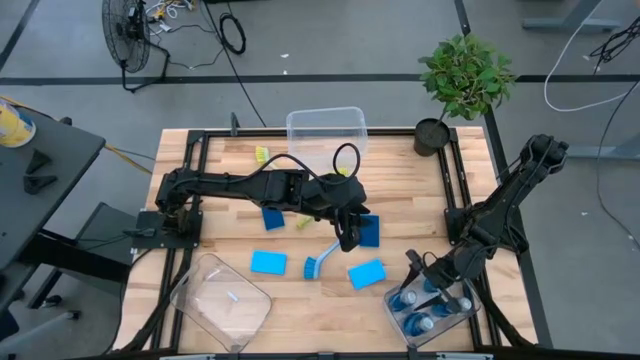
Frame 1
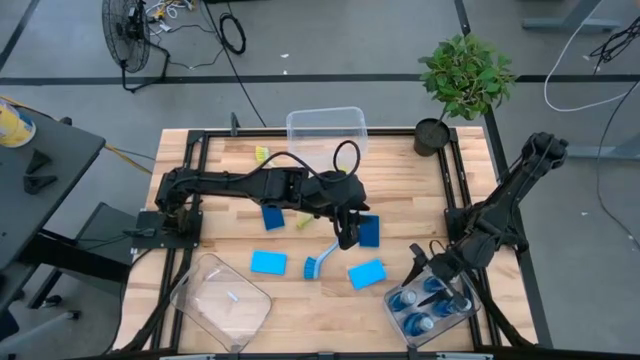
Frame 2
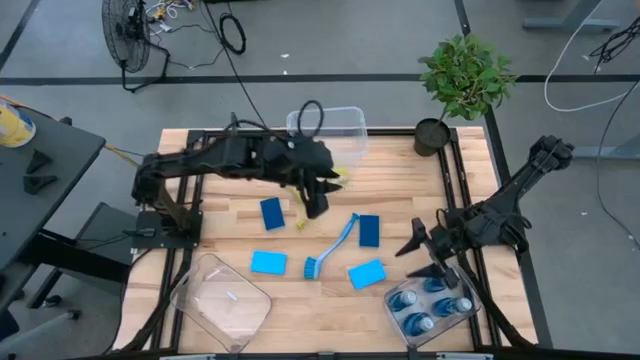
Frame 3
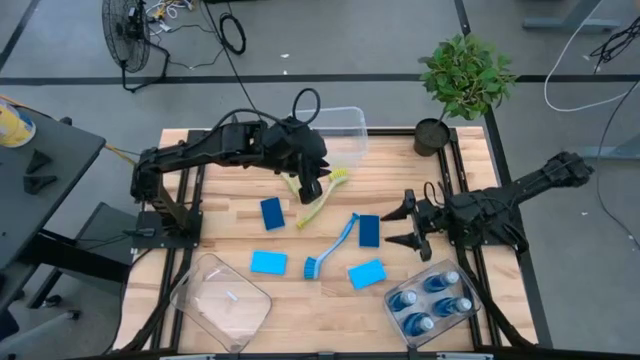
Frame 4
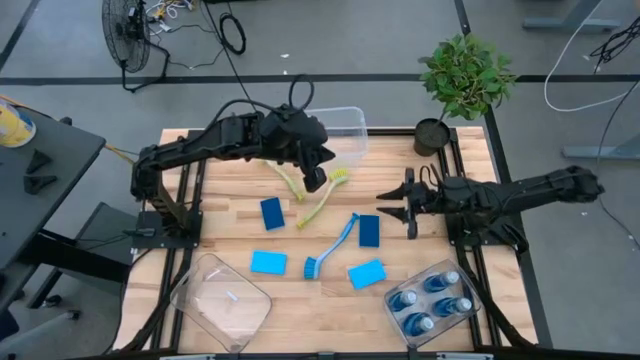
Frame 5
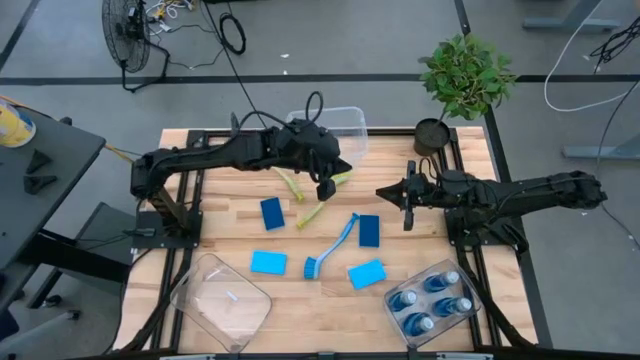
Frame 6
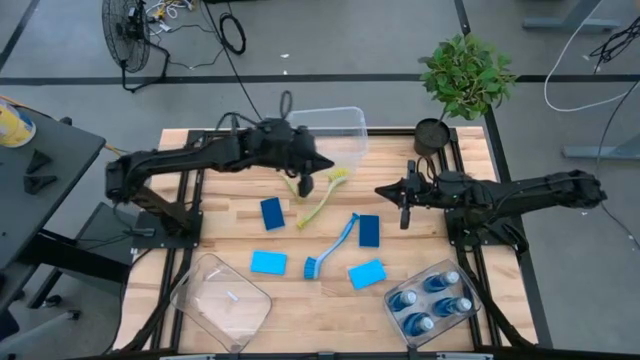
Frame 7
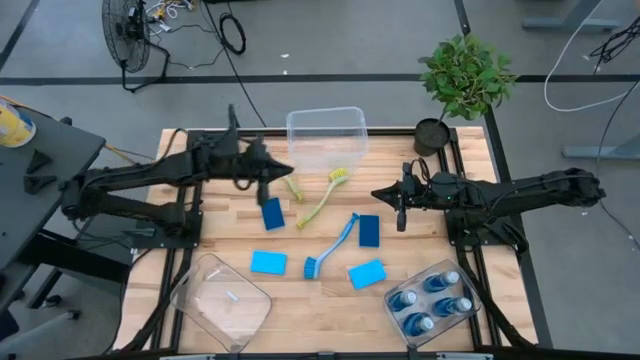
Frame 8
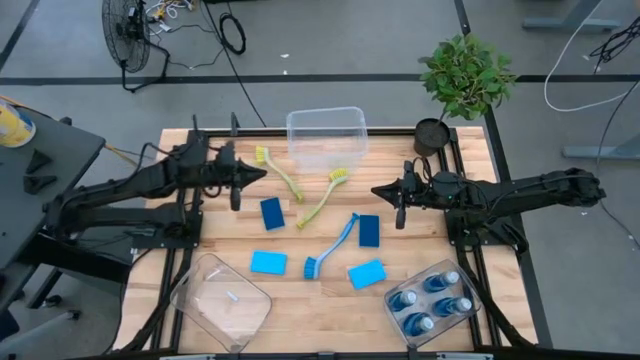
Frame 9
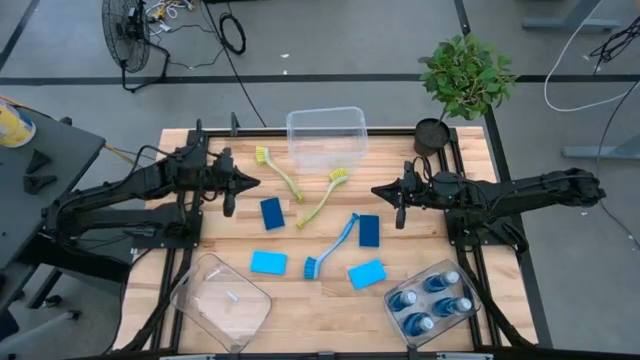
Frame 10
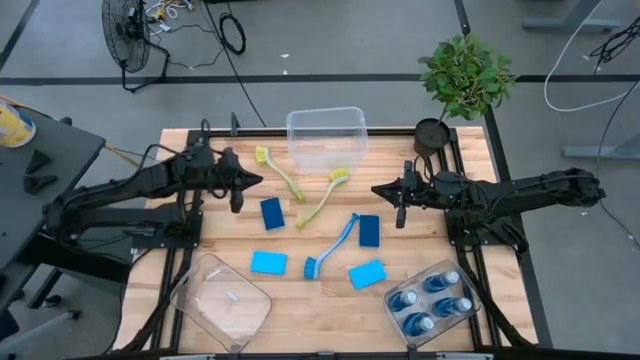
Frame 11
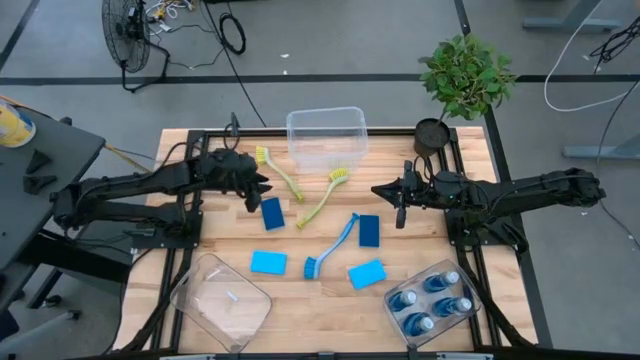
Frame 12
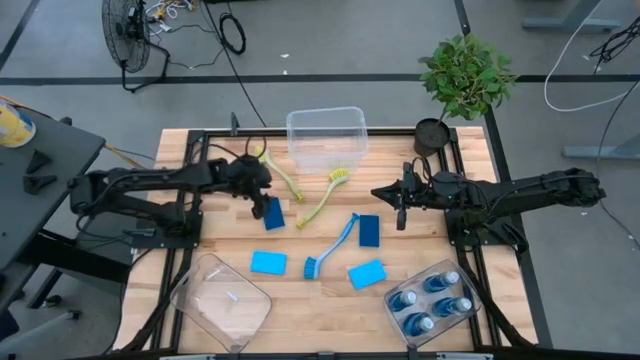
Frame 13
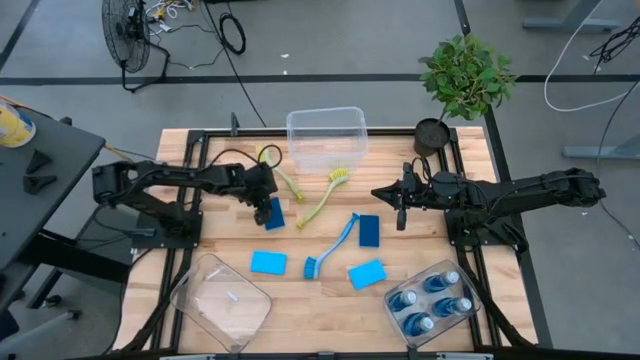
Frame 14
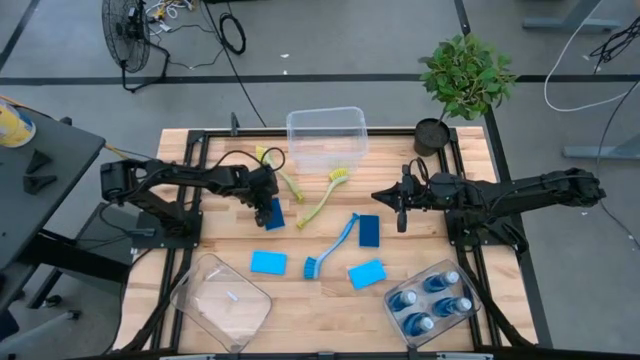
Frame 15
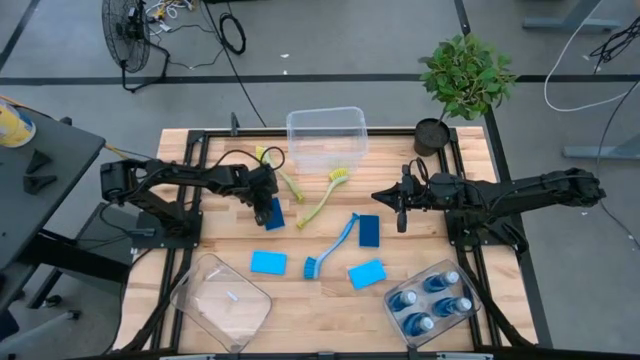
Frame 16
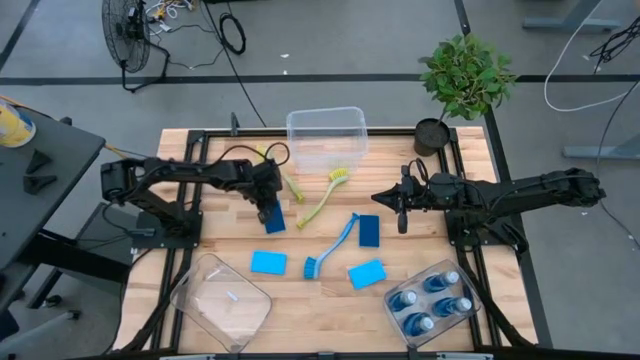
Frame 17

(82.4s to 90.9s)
Task: Pick & Place Kitchen Sink Supplies
Put the blue sponge into the bottom left transparent bin

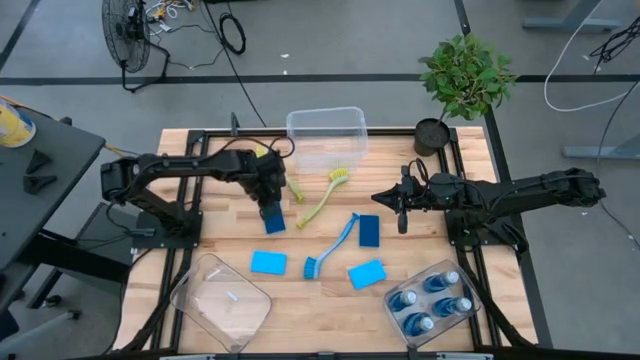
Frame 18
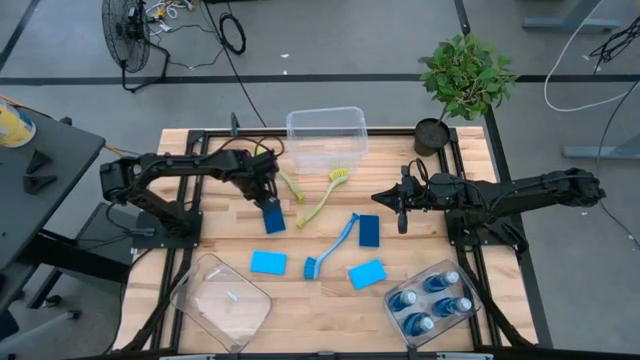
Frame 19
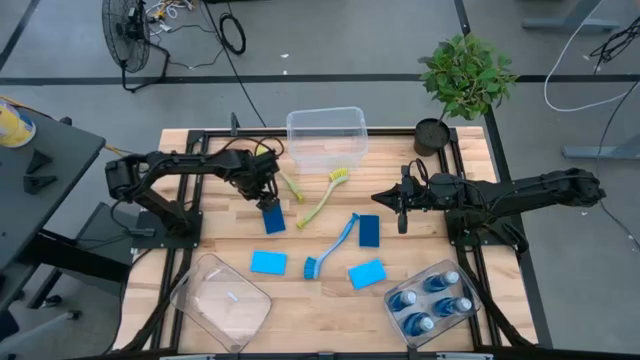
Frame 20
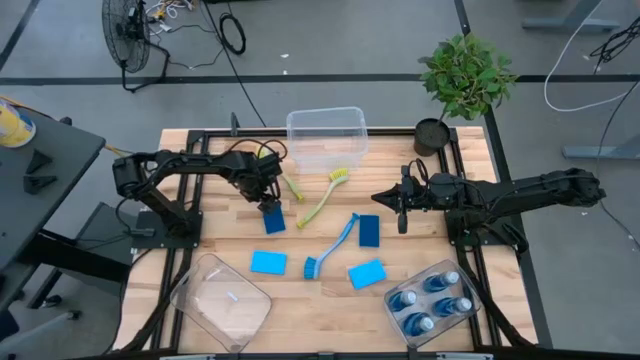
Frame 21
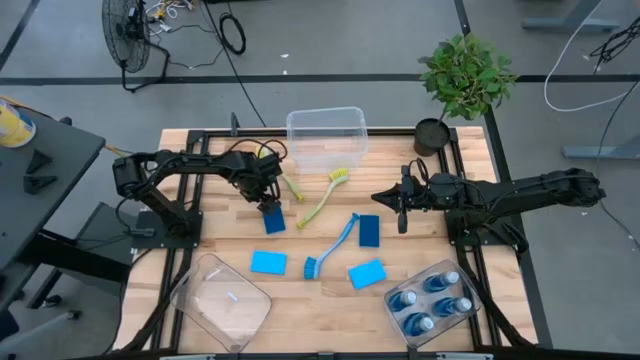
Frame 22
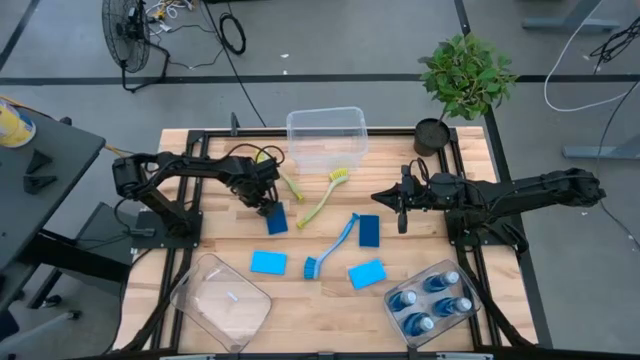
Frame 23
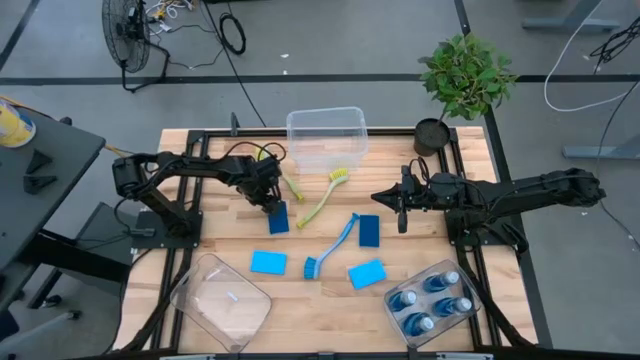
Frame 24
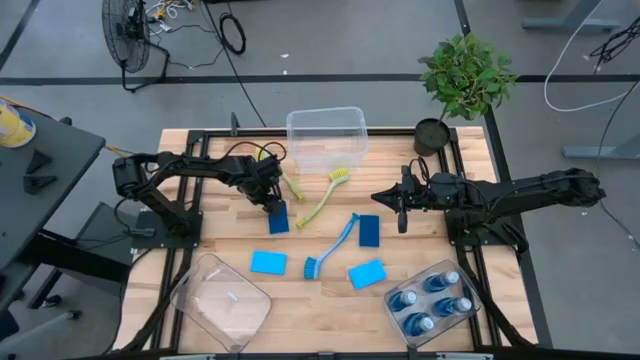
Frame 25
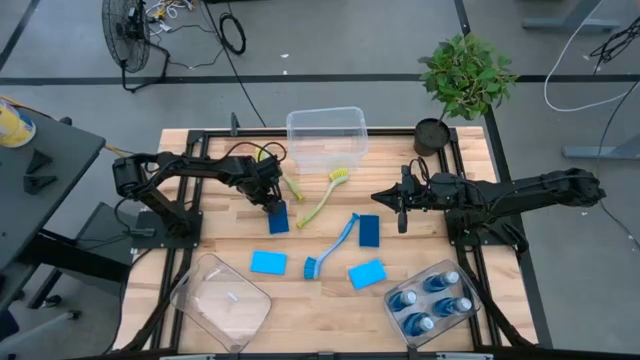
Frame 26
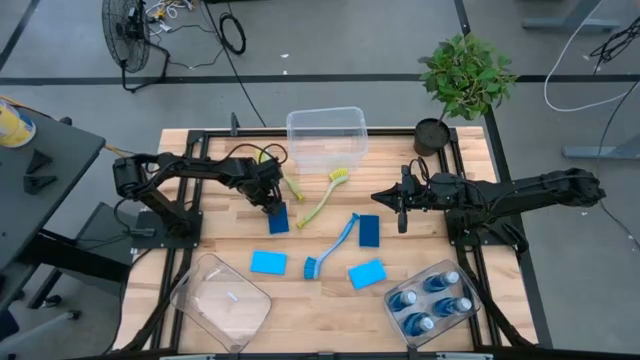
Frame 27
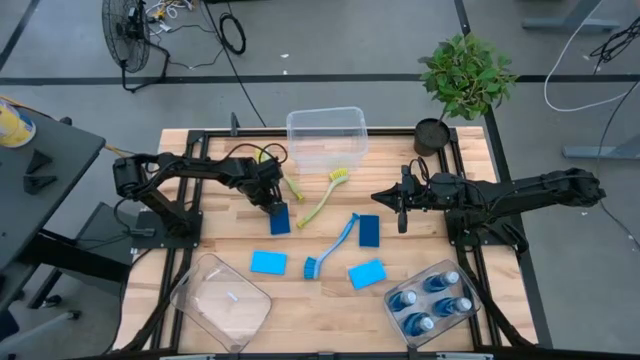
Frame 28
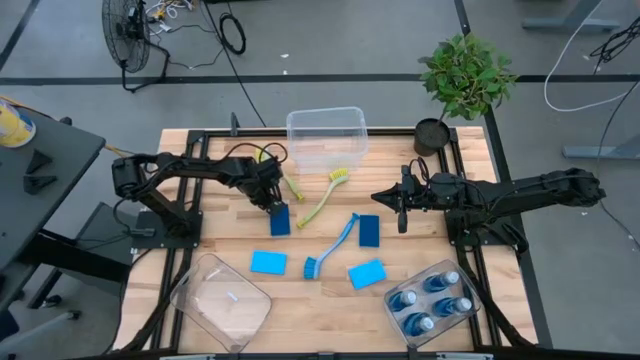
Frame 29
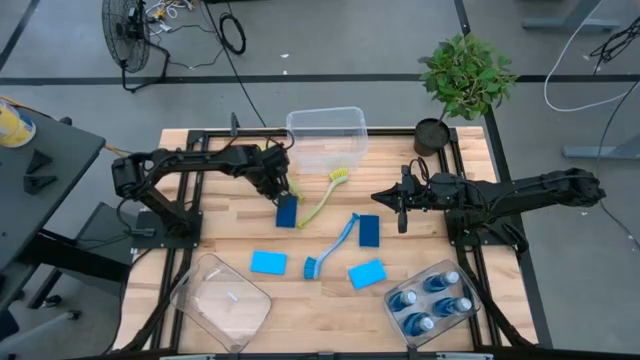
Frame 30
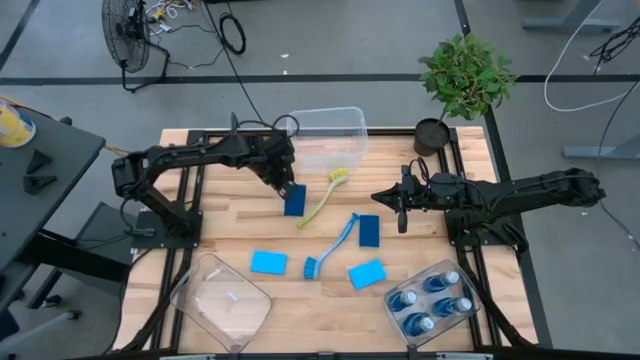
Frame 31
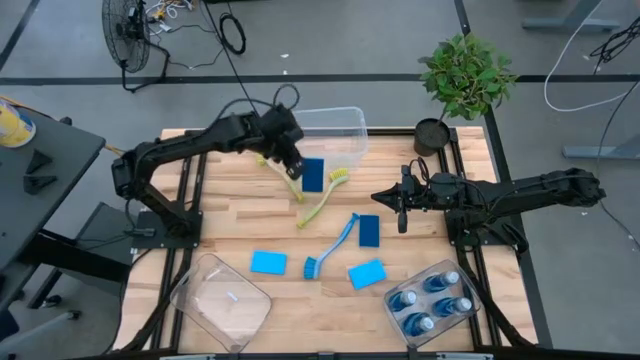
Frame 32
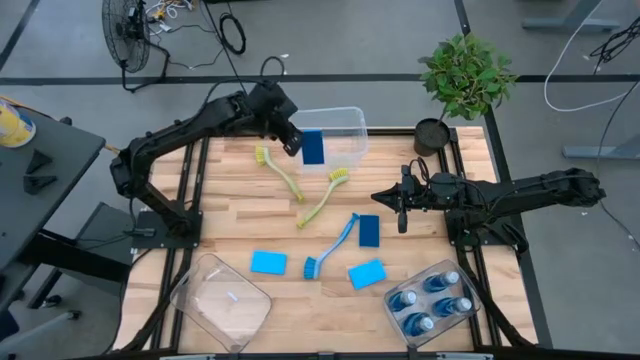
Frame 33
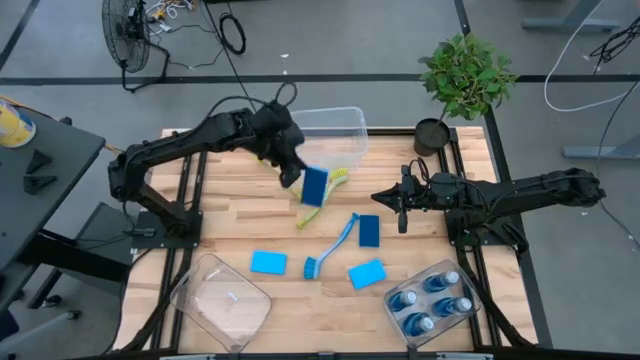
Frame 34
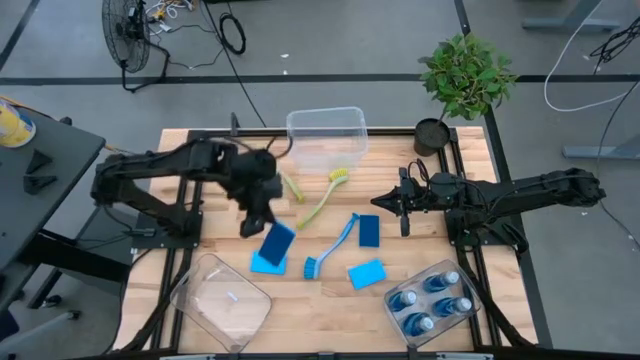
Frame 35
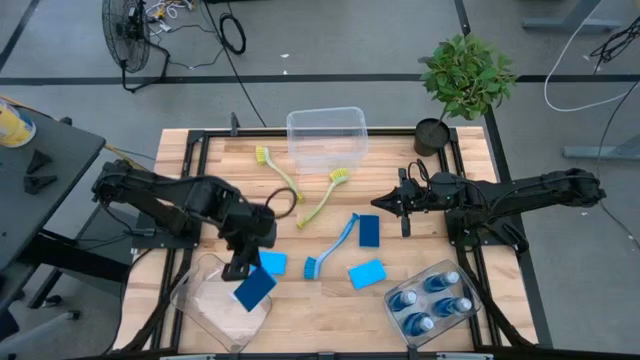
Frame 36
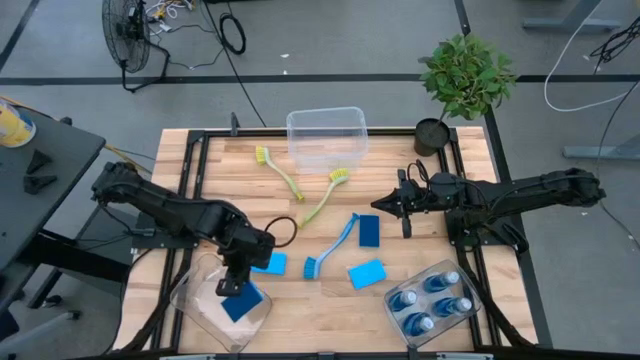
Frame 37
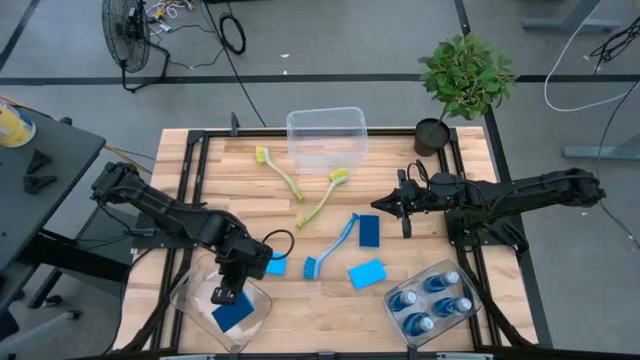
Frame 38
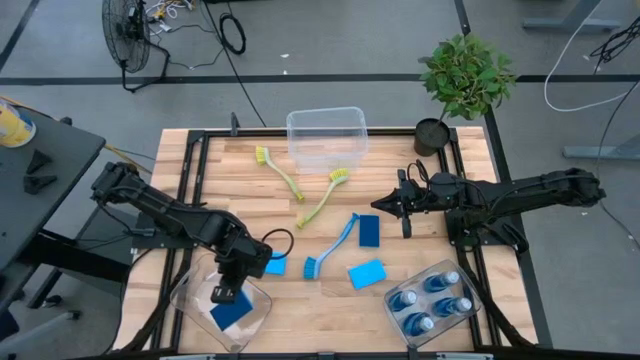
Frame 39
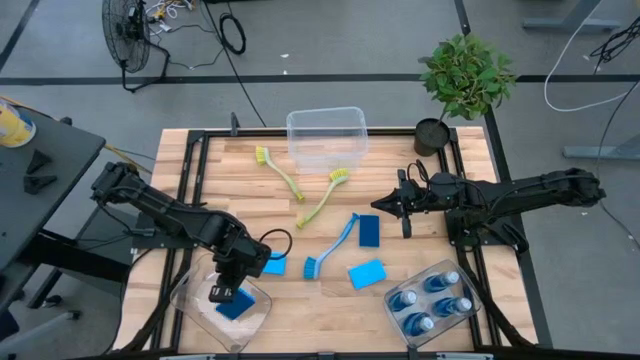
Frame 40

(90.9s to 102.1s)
Put the blue sponge into the bottom left transparent bin

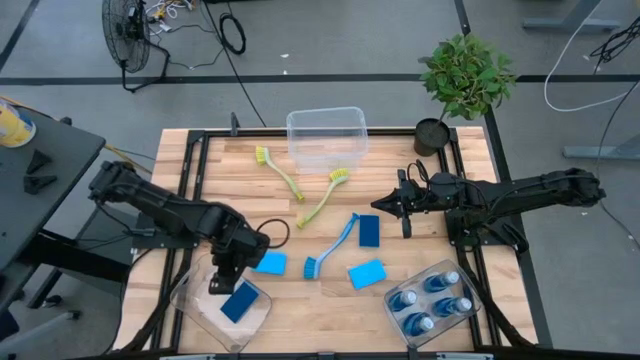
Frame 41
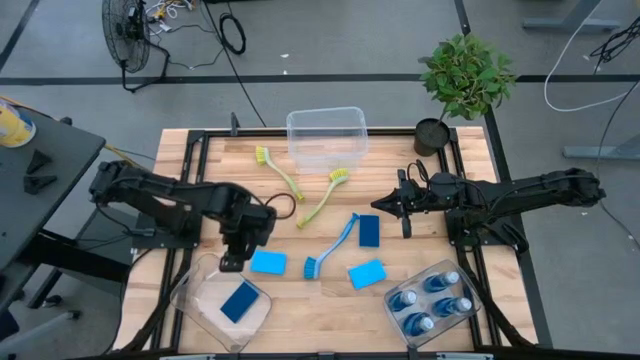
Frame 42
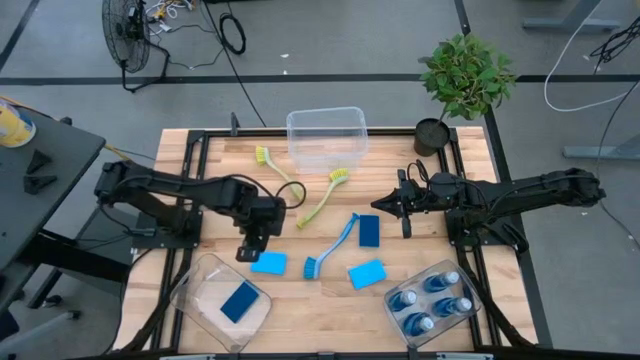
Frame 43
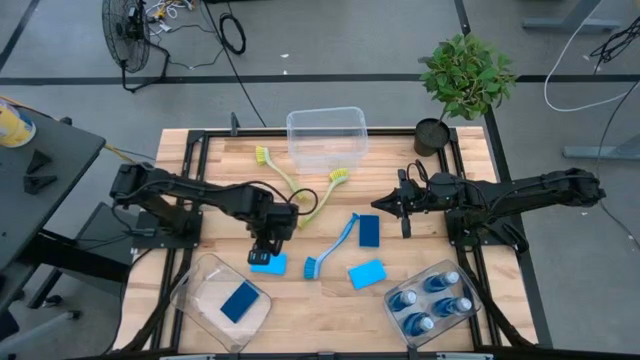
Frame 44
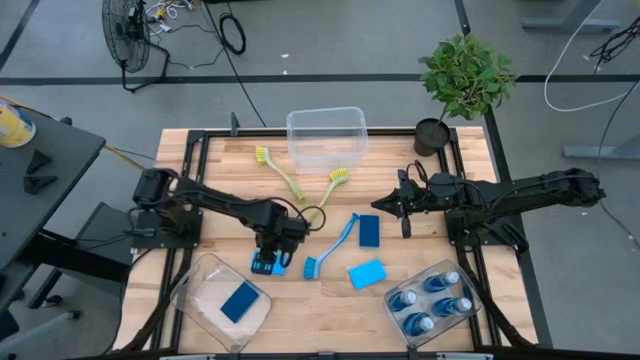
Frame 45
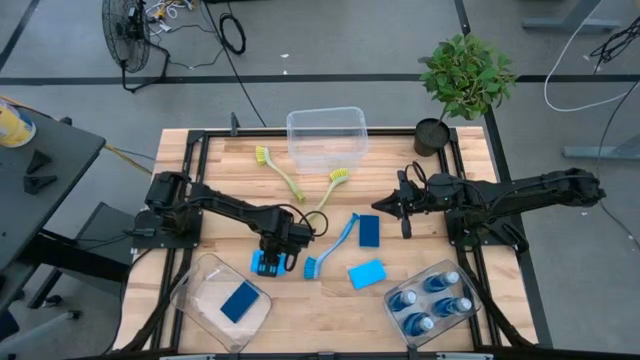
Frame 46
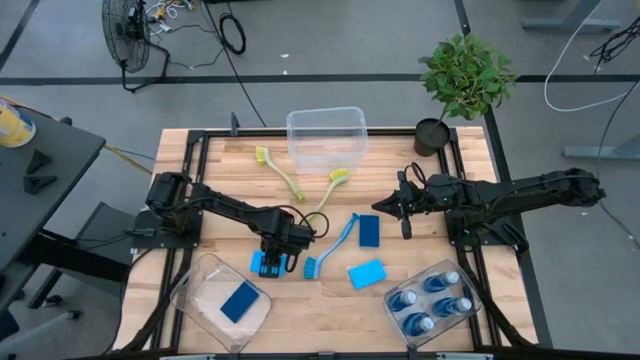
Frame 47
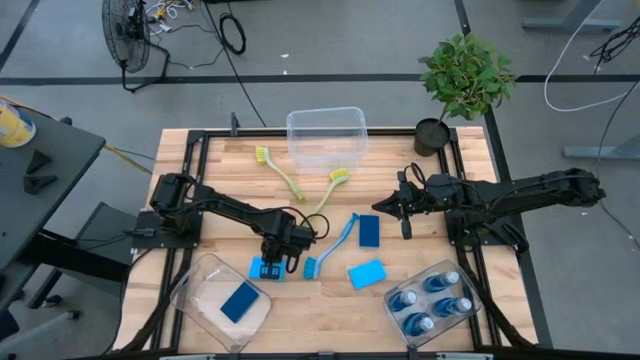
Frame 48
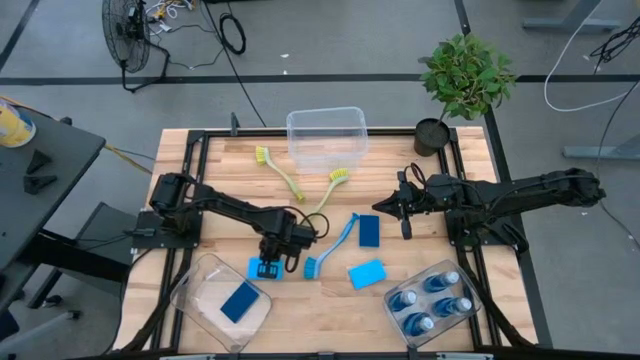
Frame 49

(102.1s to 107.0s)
Put the blue sponge into the bottom left transparent bin
